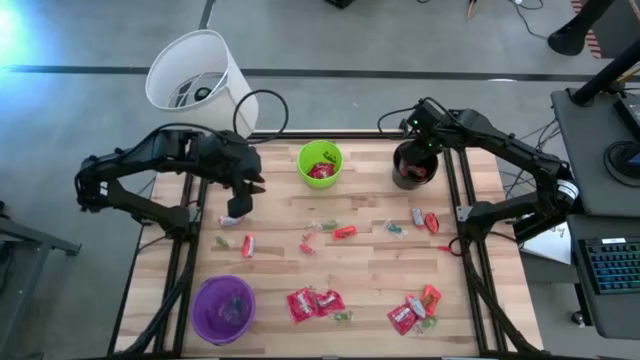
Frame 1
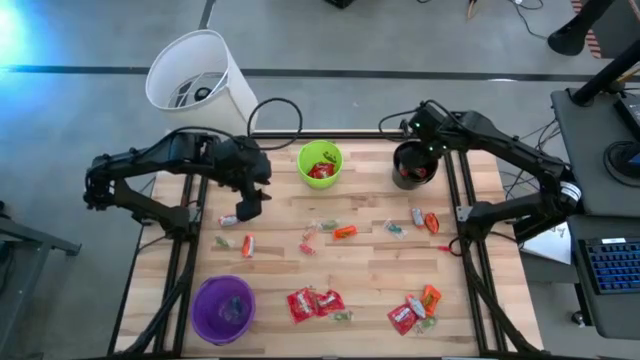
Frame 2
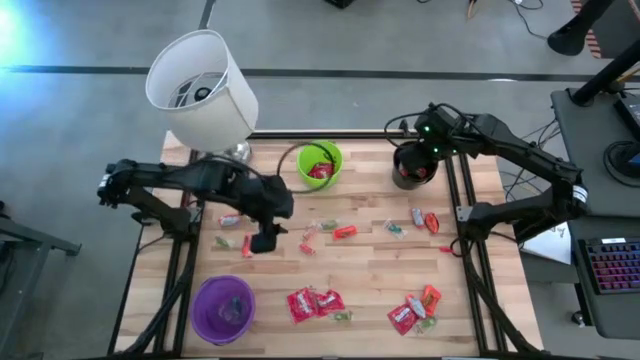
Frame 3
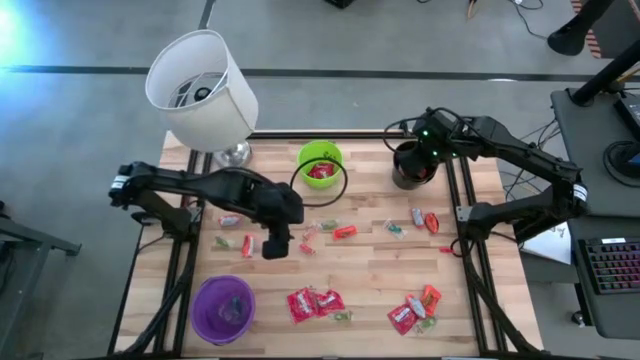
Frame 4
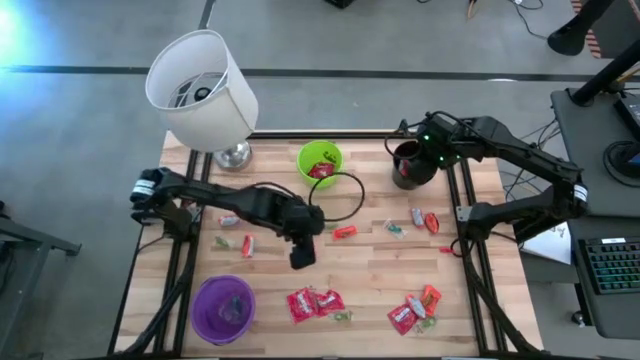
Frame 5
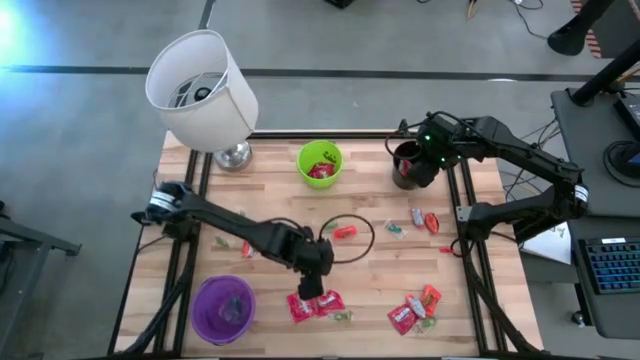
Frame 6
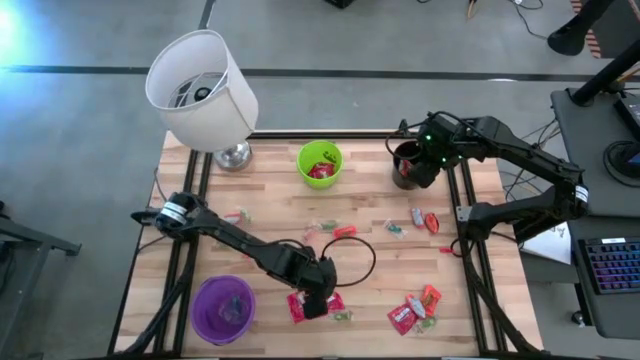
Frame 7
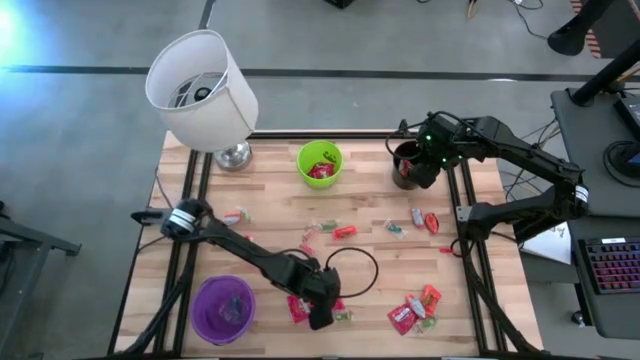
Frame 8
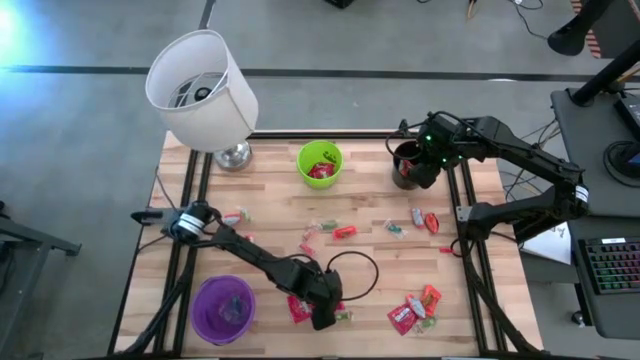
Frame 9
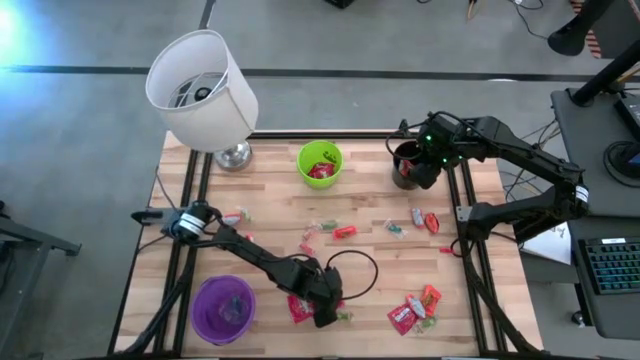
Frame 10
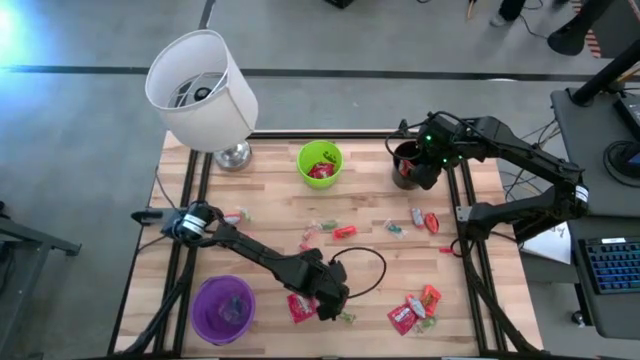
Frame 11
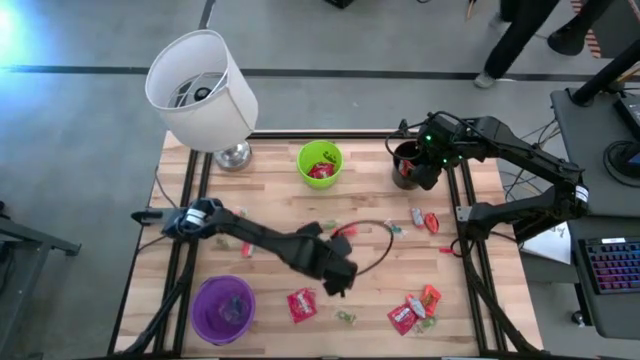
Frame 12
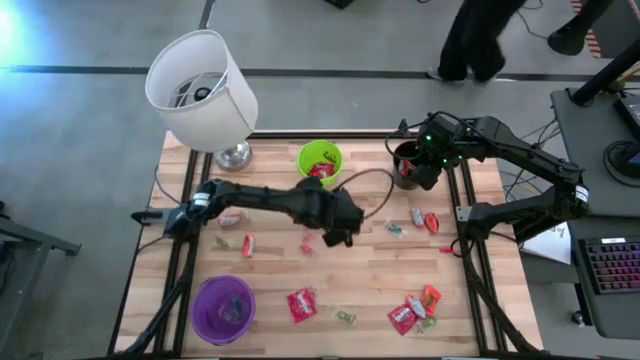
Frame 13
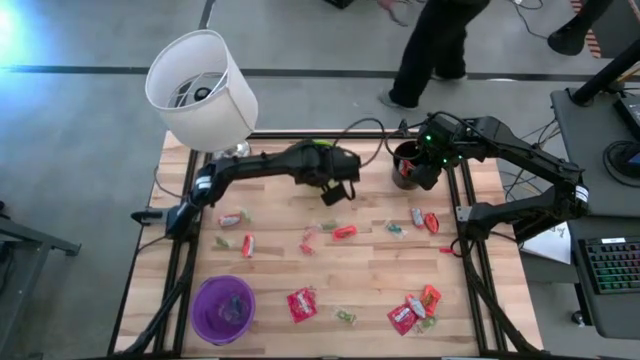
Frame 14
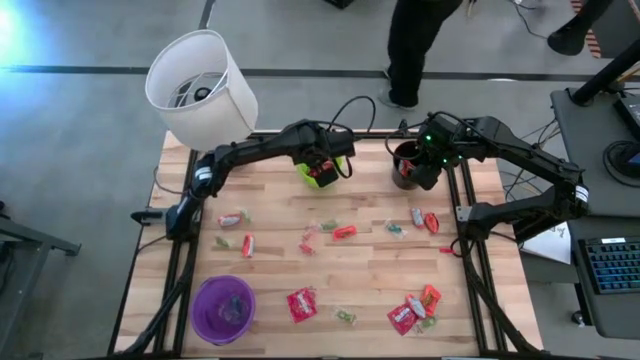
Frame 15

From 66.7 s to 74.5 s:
Task: Sort candy
Put the red candy into the green bucket

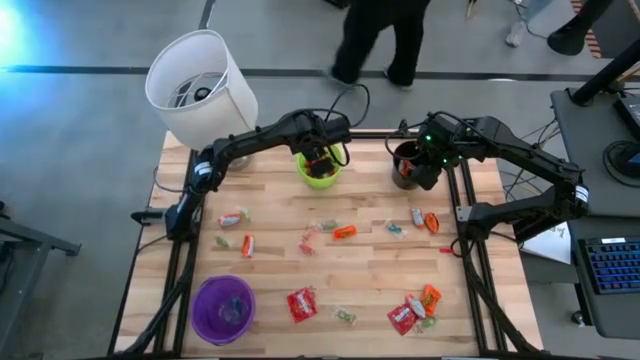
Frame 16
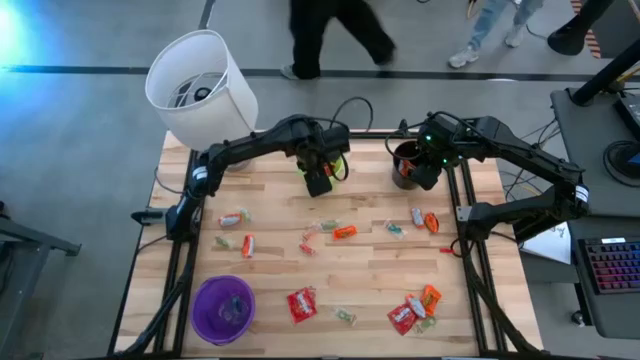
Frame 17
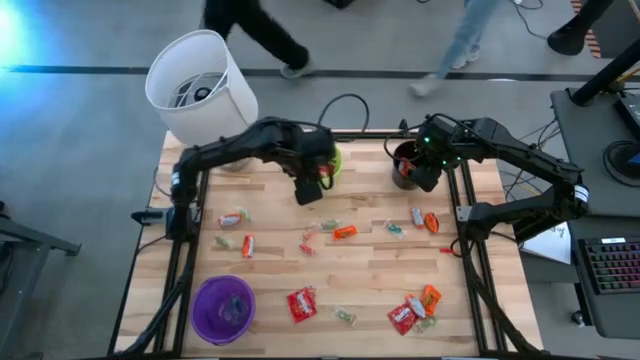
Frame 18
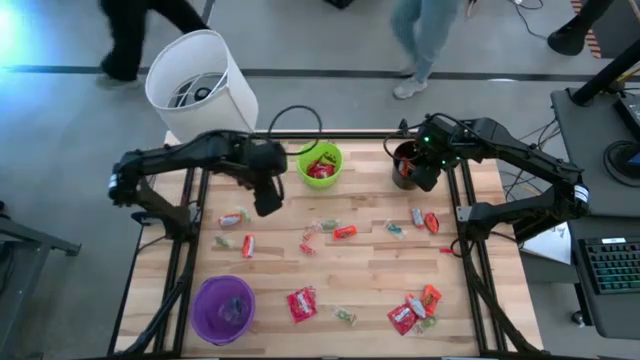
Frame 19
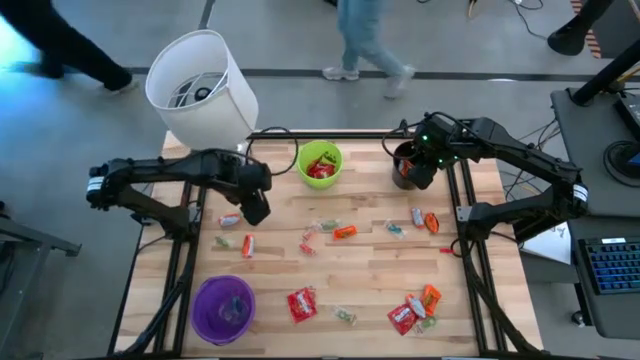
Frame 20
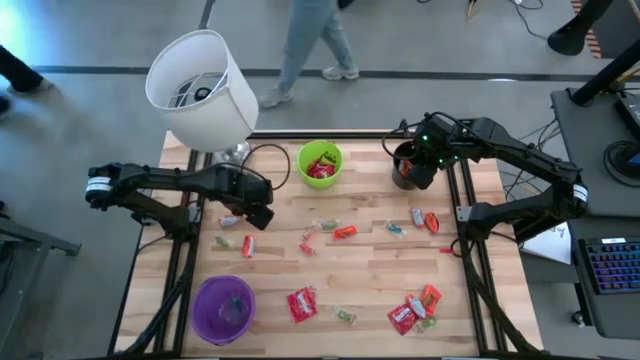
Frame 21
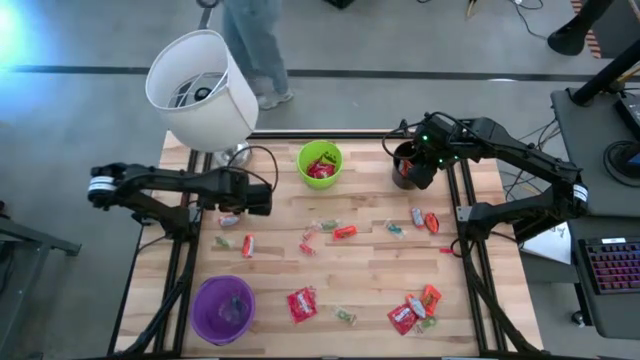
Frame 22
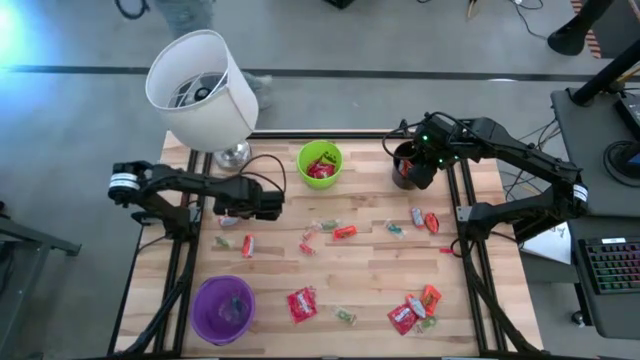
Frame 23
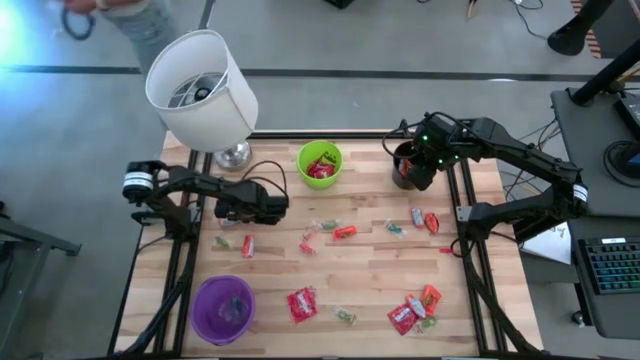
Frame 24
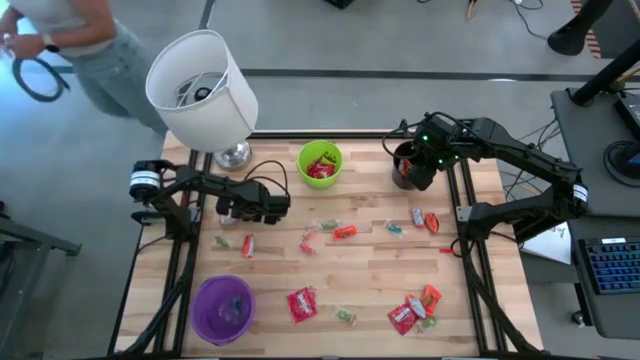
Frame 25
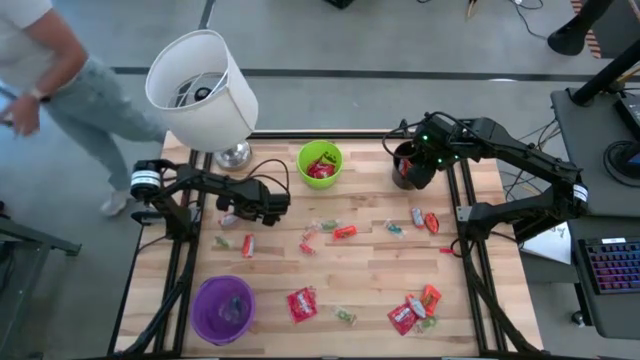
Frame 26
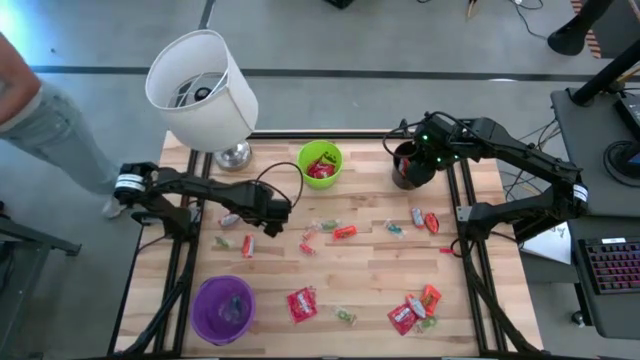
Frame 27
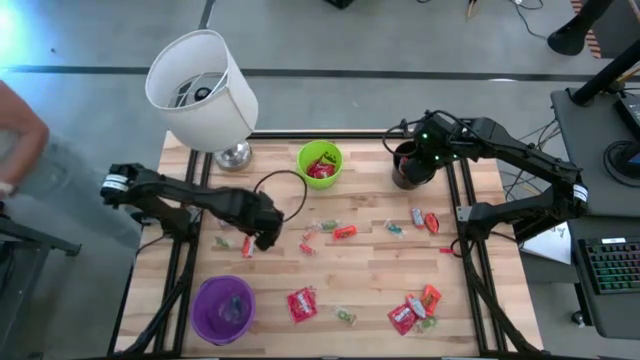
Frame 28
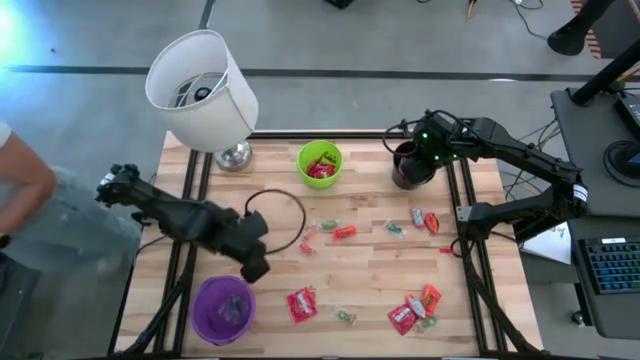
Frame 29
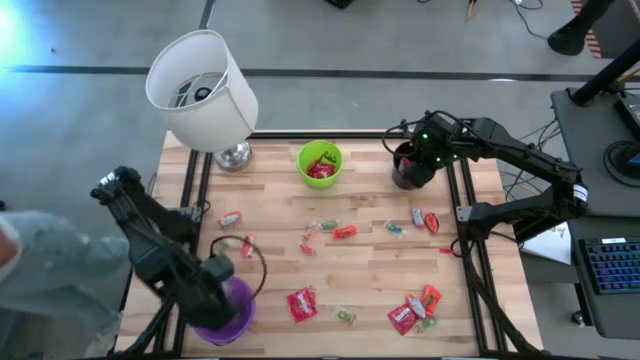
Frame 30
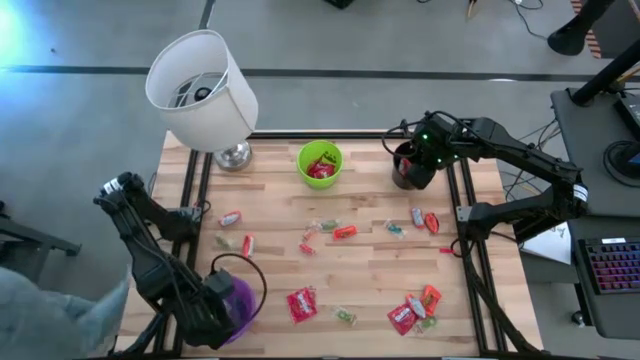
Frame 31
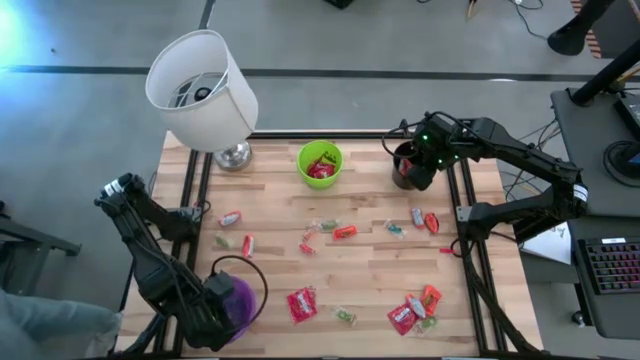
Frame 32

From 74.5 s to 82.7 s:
Put the green gummy candy into the violet bucket

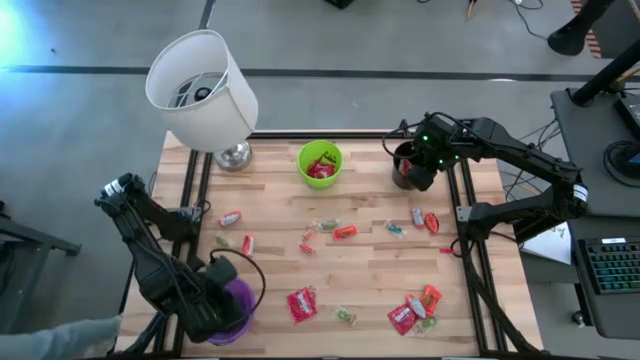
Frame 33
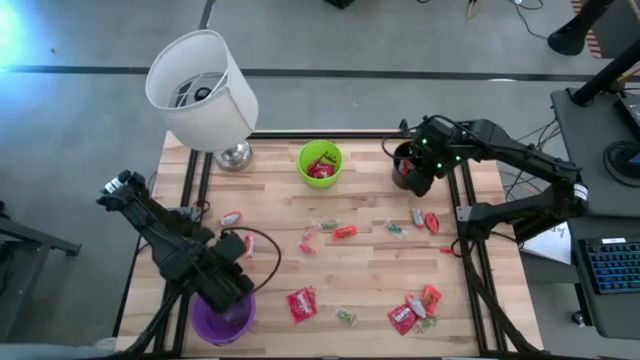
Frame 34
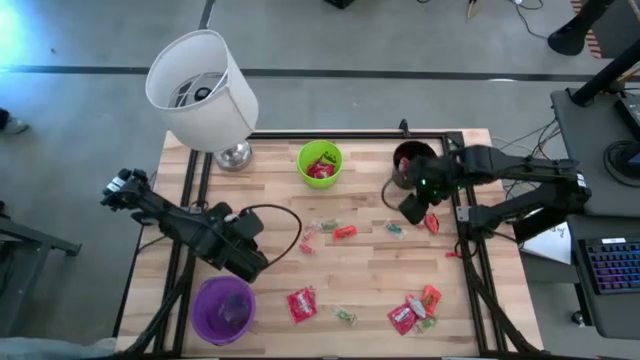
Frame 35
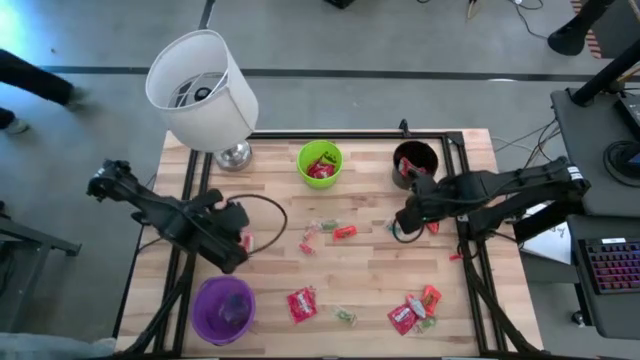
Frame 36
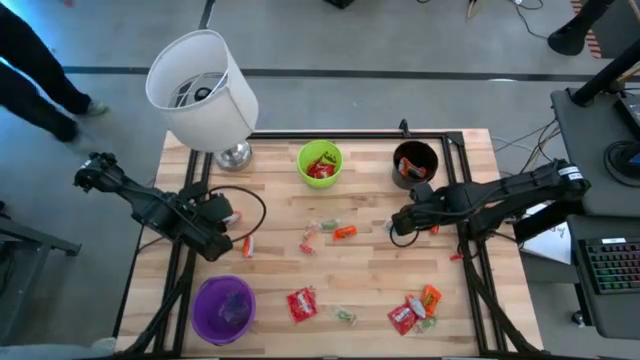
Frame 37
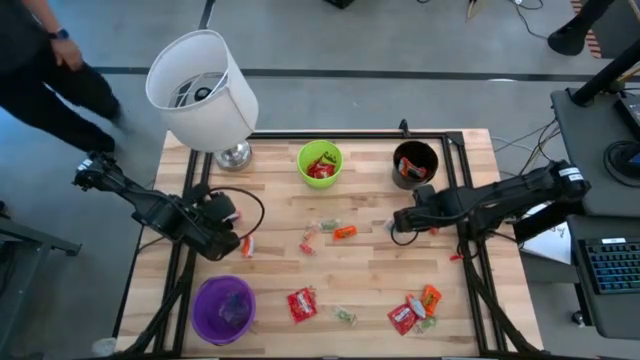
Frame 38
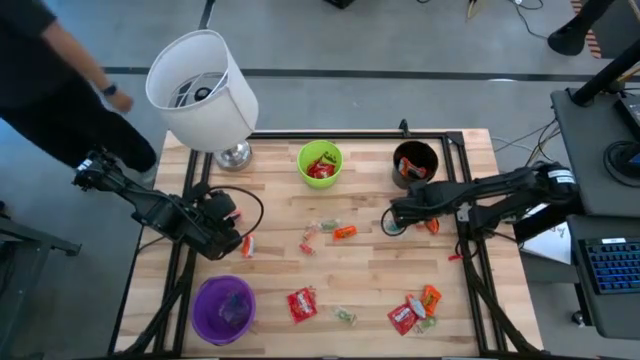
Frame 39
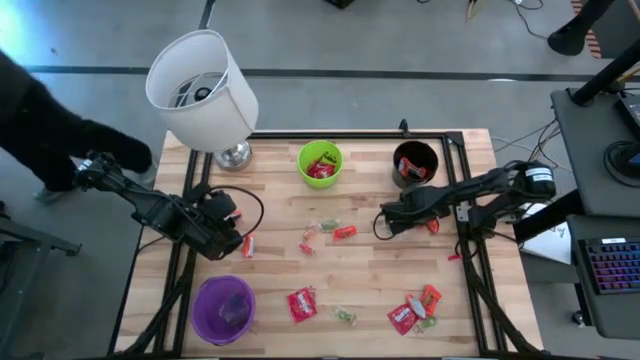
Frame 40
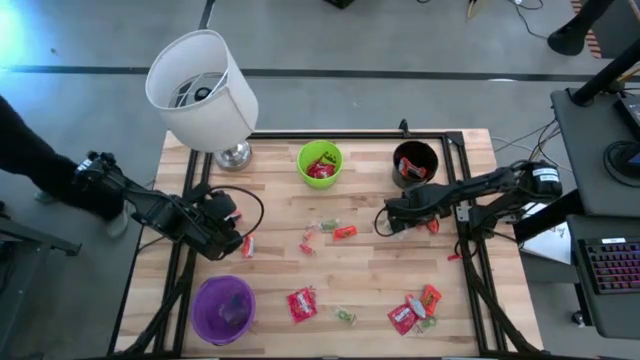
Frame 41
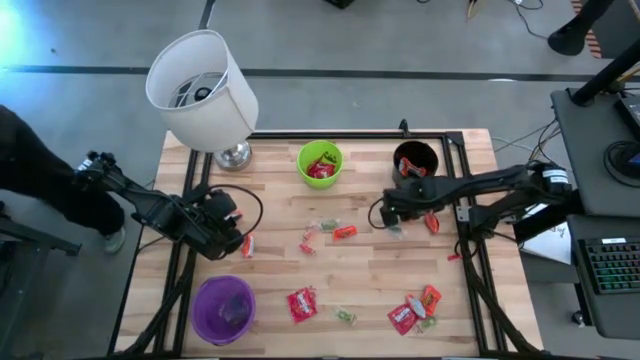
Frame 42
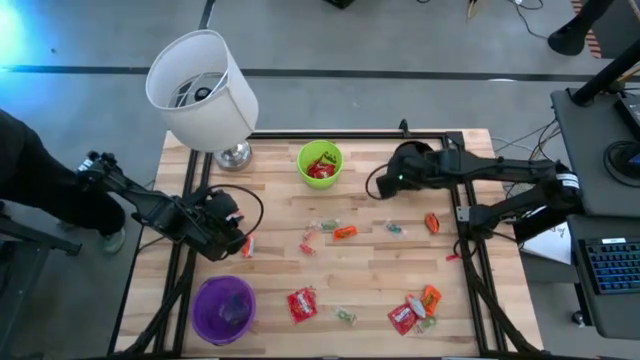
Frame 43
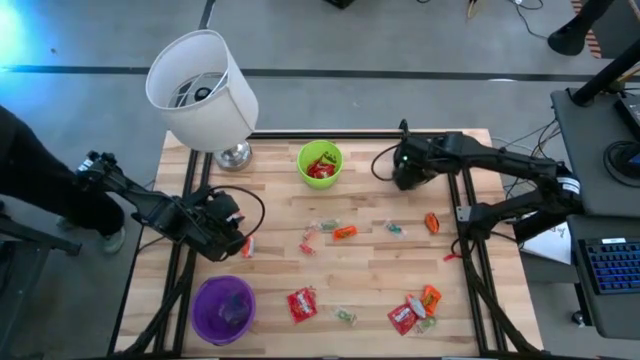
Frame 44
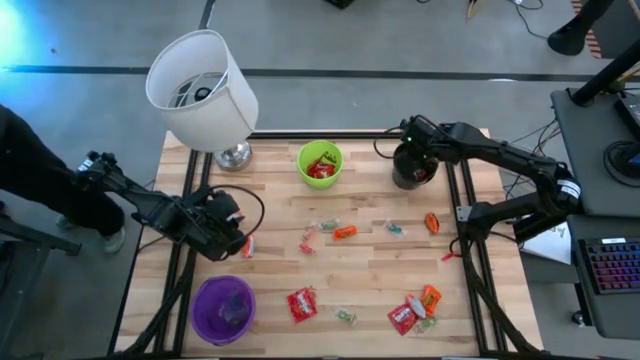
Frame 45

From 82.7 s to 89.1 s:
Put the orange candy into the black bucket
